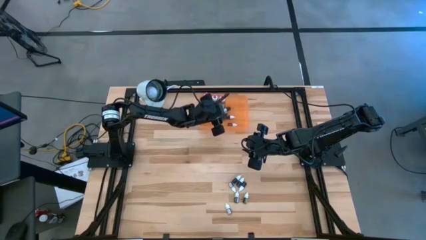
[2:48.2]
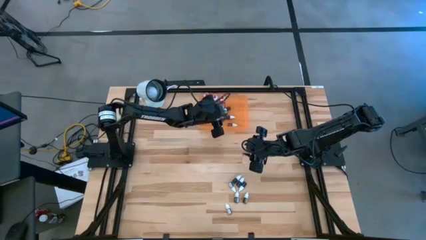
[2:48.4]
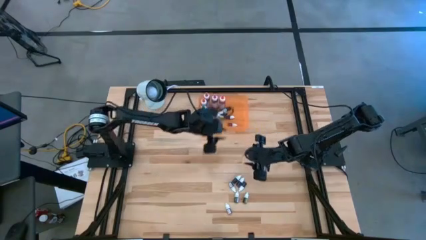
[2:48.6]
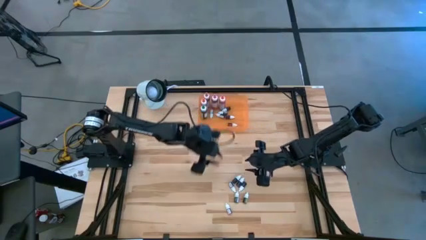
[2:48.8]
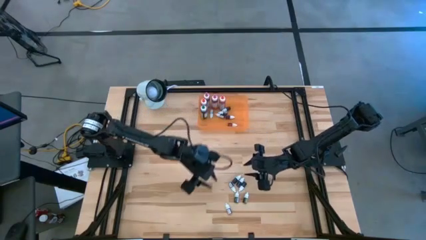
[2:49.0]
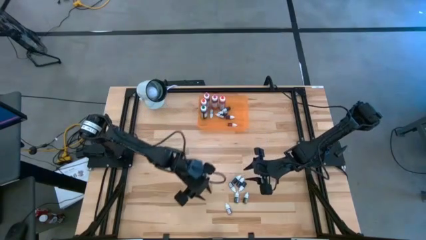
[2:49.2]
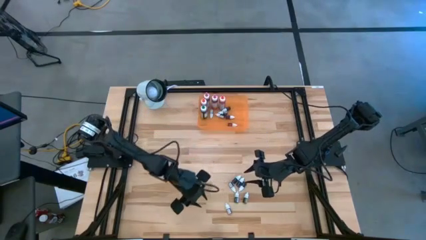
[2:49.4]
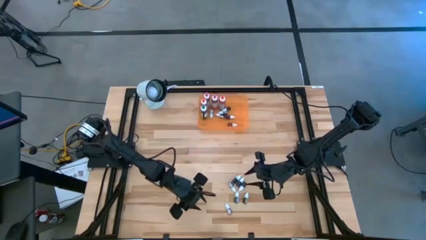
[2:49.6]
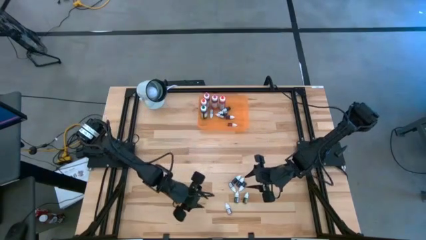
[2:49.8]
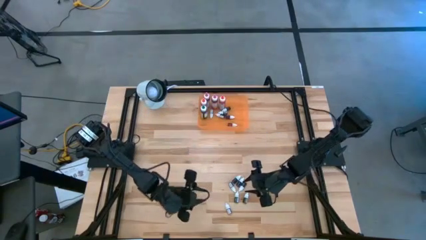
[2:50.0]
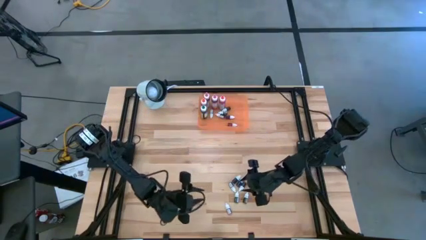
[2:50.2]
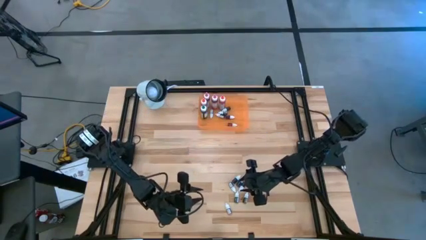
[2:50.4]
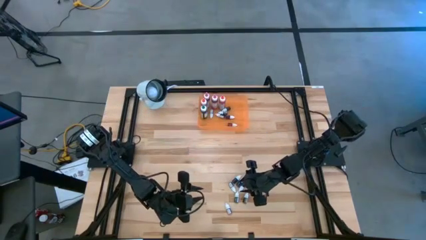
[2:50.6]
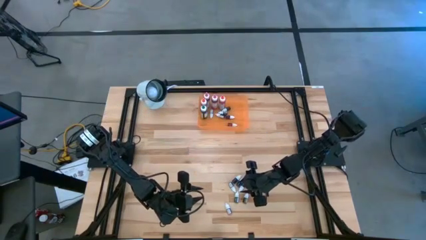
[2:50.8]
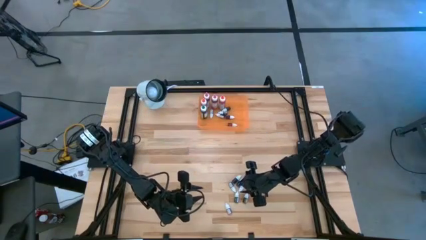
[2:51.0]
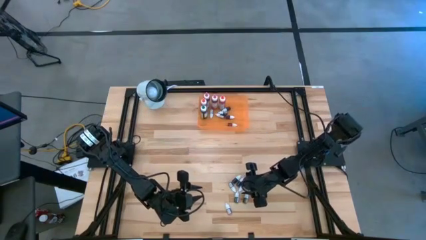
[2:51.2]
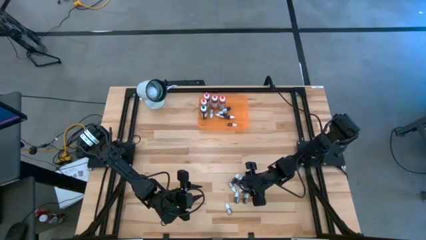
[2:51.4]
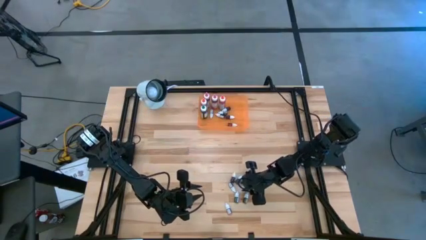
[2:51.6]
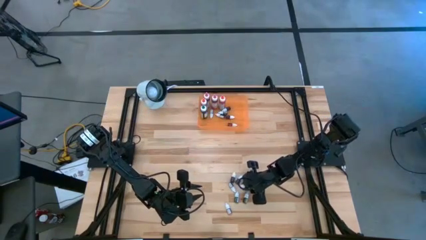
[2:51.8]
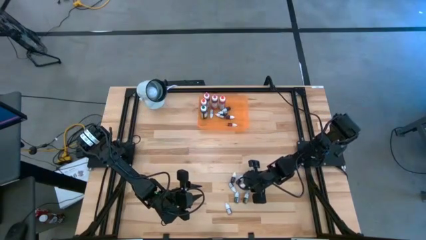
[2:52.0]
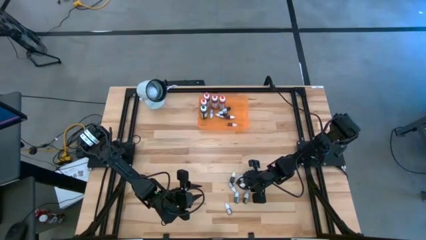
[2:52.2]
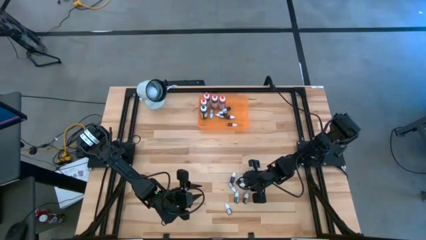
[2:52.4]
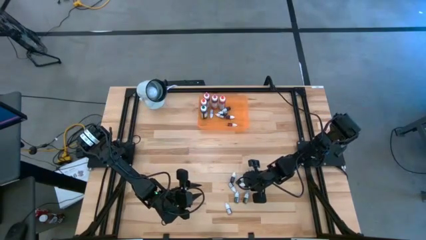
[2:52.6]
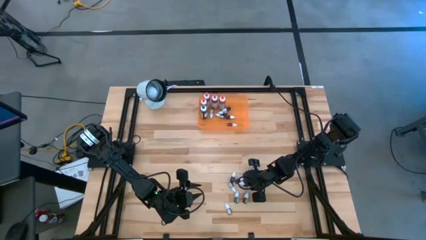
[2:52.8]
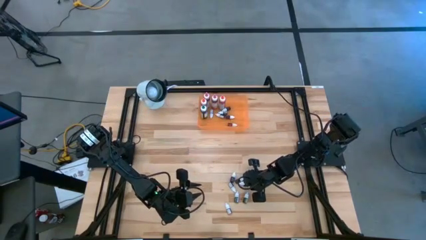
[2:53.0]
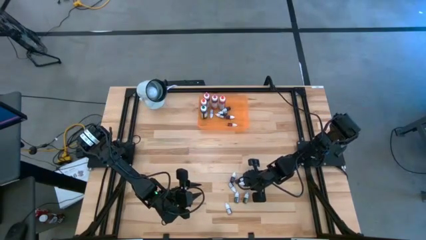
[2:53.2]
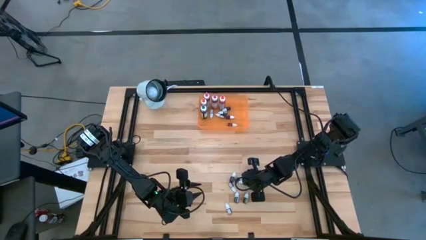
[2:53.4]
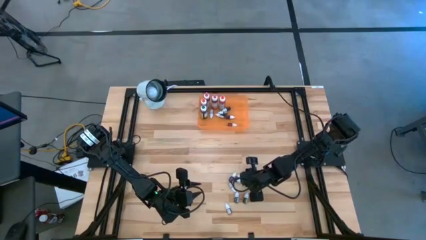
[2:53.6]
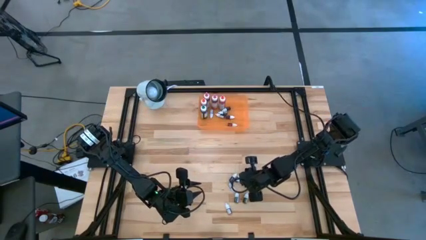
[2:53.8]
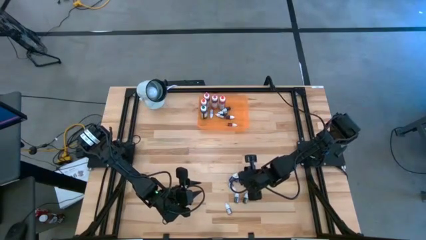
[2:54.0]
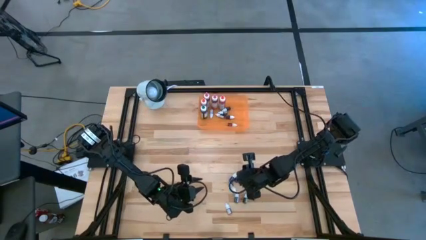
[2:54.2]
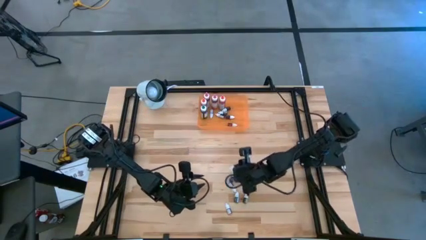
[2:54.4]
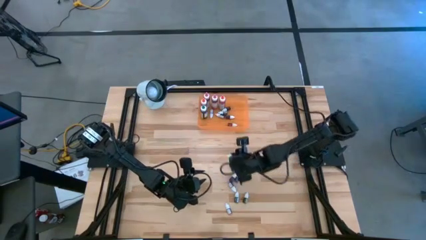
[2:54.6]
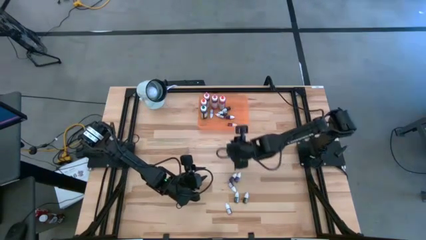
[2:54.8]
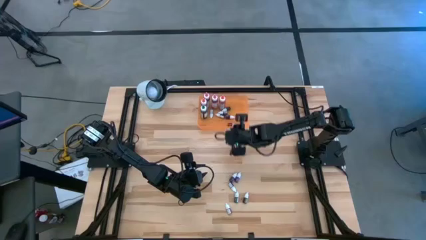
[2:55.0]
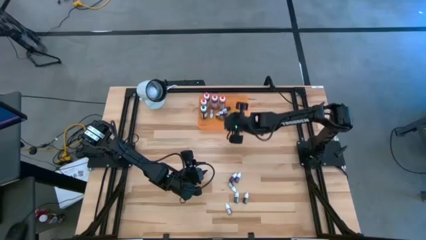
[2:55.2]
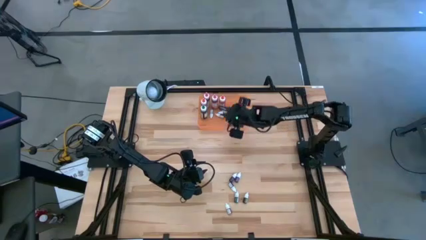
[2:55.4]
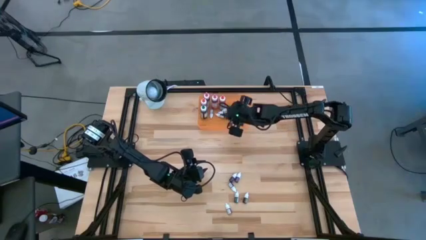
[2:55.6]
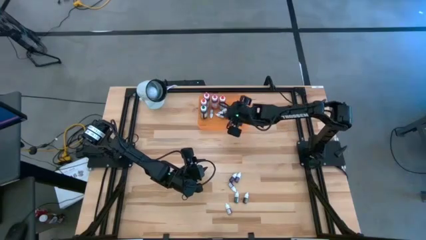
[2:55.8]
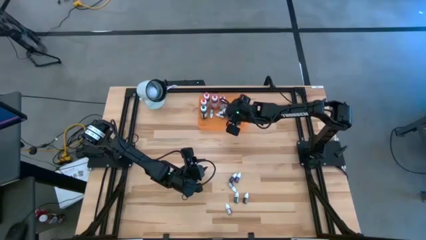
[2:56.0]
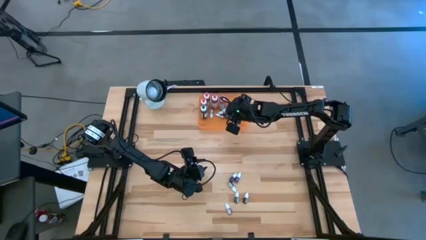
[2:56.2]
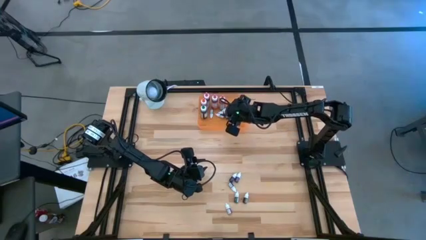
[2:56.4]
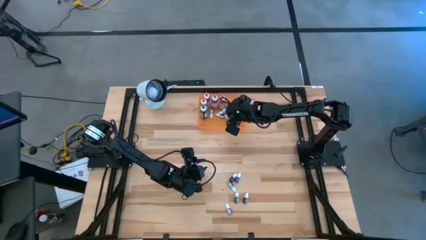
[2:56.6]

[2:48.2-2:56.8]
Task: Pick & Place food coloring
Put the black small food coloring bottle into the orange bin

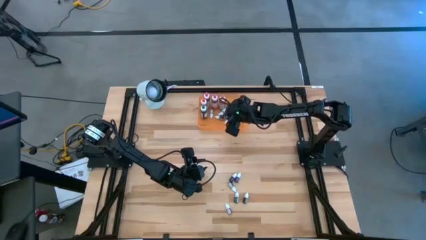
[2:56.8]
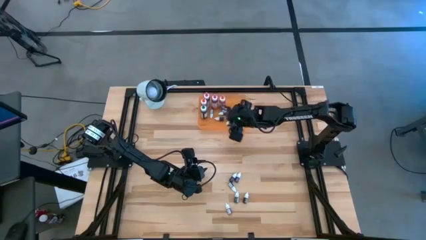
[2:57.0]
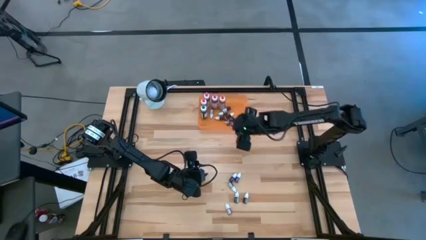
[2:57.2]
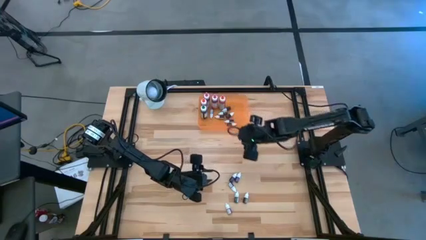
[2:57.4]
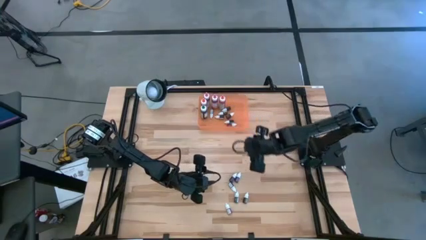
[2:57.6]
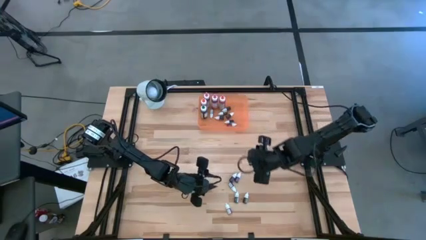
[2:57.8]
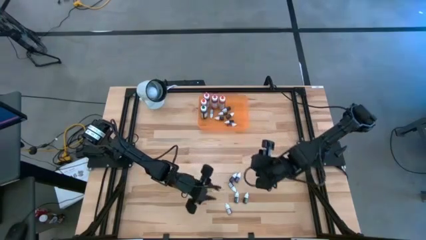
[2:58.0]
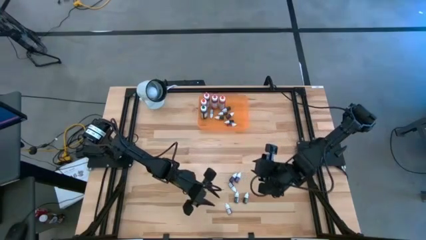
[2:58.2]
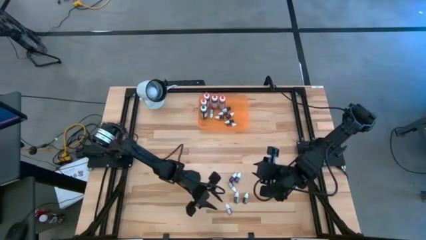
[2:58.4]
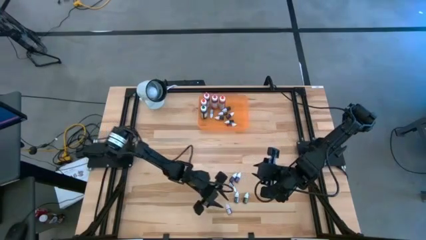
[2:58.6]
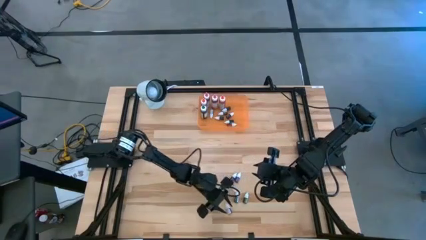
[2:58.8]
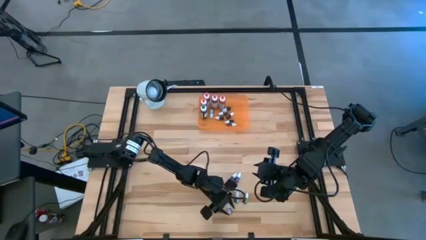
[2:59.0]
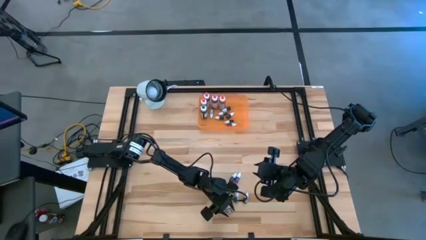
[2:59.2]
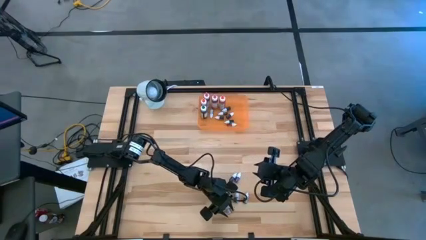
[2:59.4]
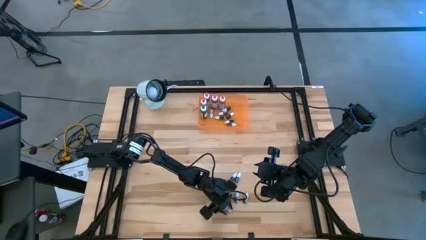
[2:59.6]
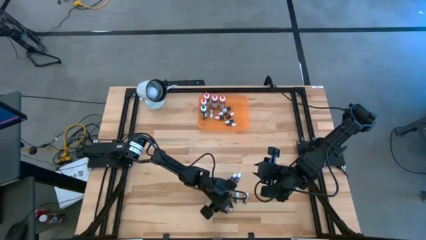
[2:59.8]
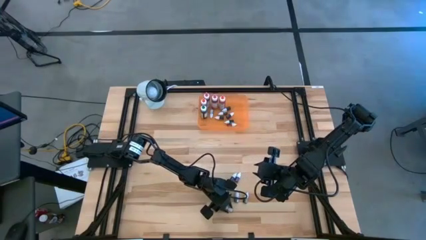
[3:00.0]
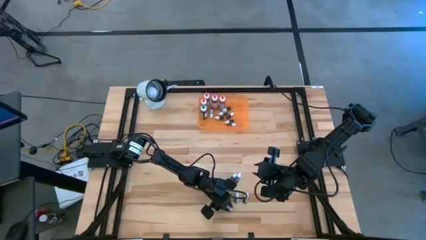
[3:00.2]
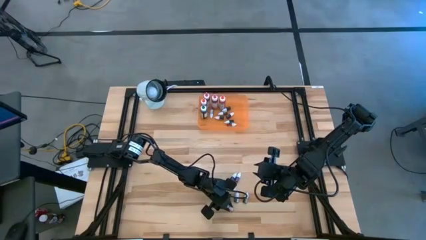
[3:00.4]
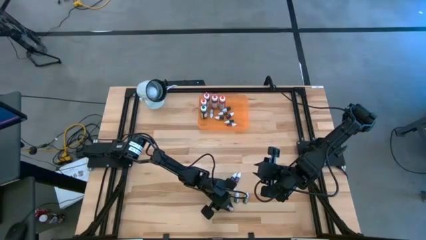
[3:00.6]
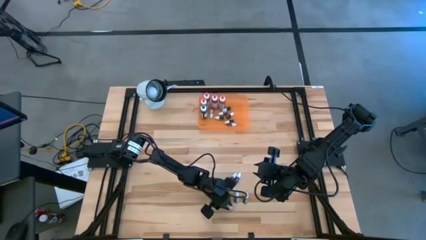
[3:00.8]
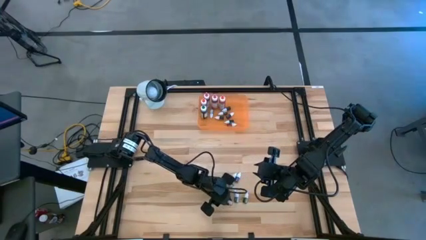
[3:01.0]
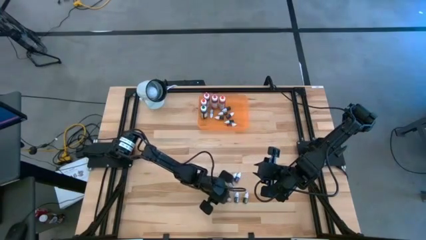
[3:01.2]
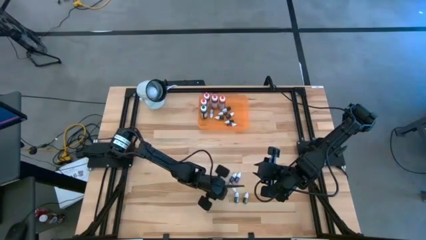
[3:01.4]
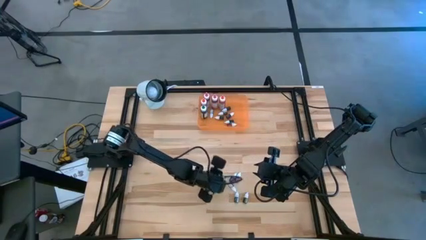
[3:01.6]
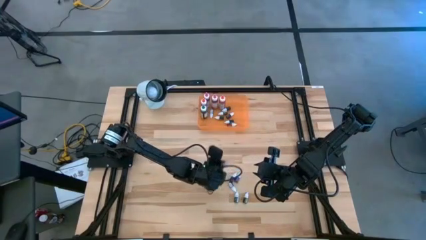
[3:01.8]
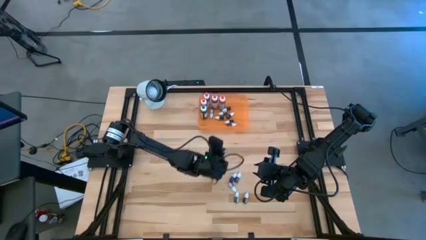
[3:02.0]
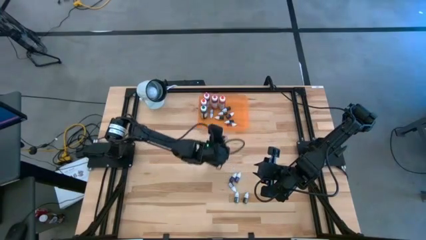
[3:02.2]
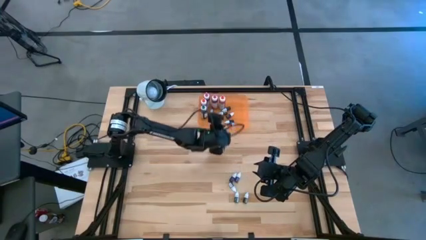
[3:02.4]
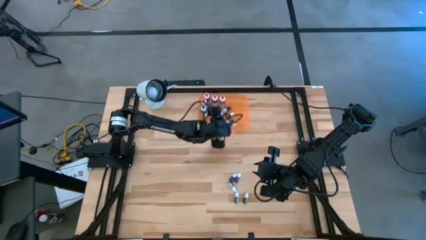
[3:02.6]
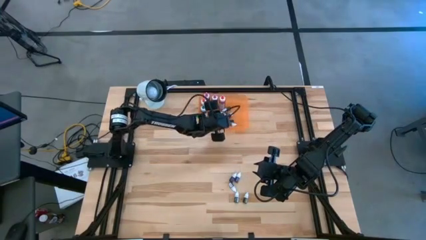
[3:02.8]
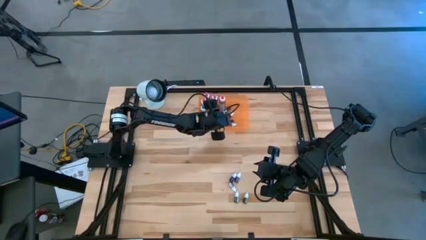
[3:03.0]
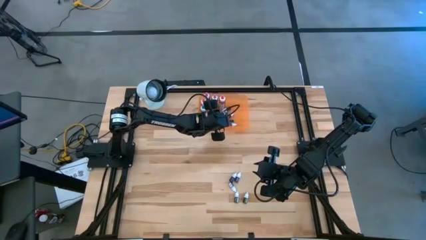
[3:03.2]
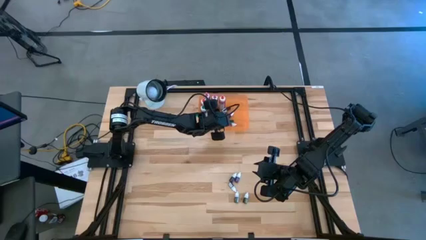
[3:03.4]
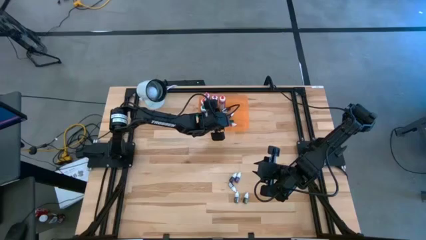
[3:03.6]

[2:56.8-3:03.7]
Put the orange and white small food coloring bottle into the orange bin
